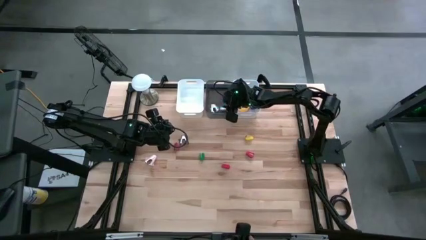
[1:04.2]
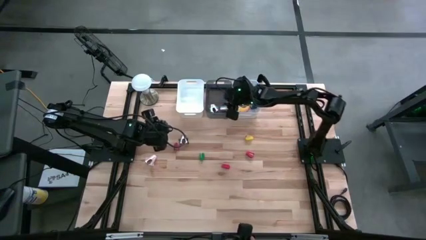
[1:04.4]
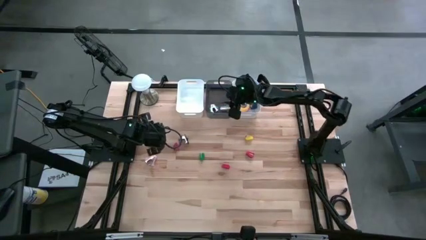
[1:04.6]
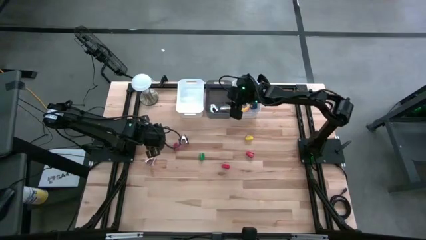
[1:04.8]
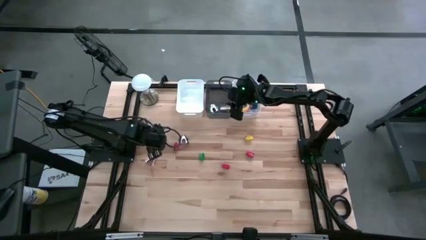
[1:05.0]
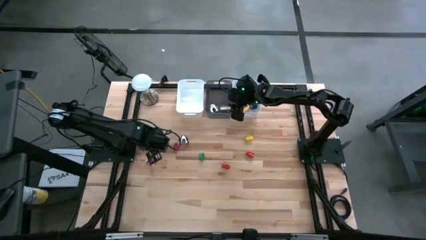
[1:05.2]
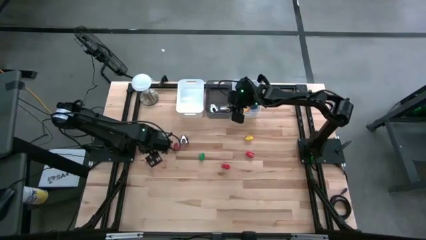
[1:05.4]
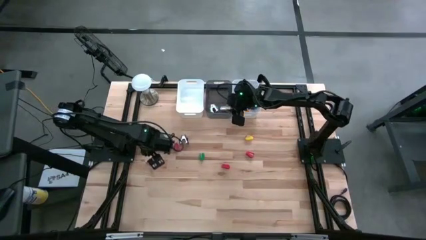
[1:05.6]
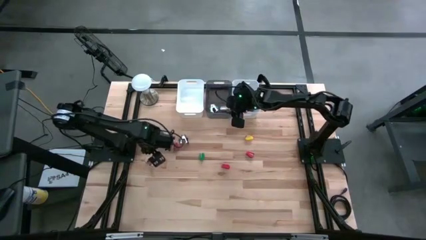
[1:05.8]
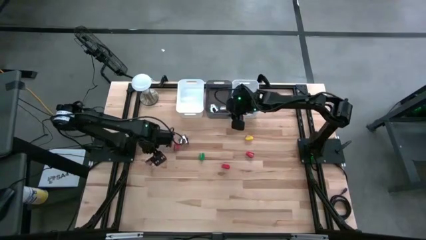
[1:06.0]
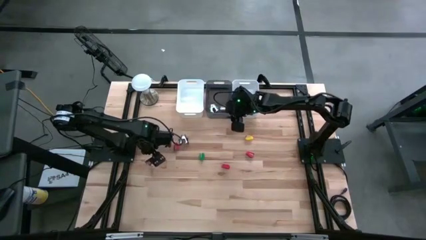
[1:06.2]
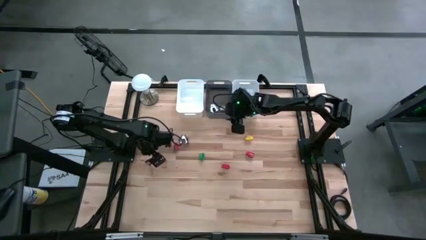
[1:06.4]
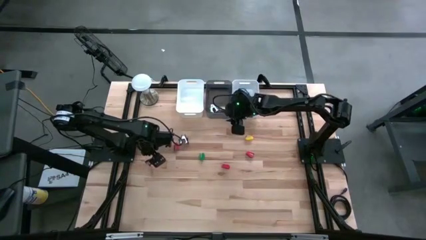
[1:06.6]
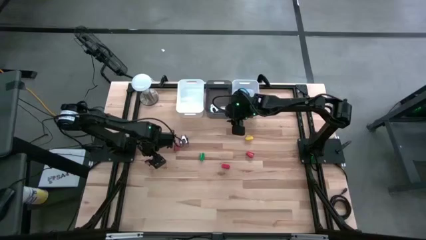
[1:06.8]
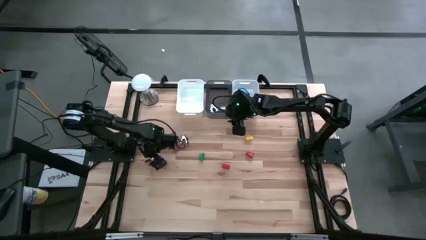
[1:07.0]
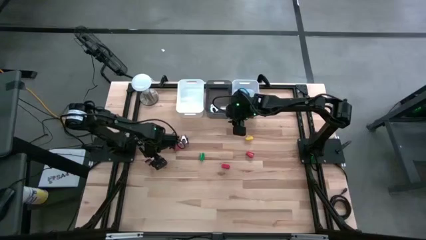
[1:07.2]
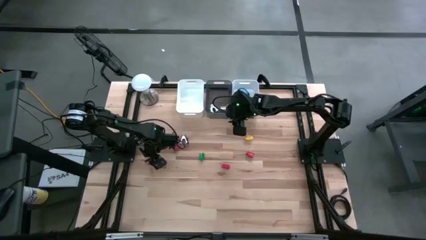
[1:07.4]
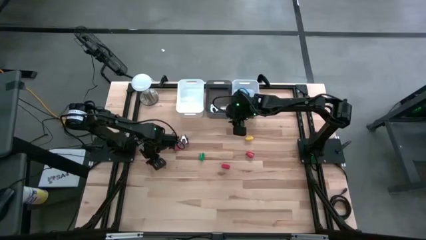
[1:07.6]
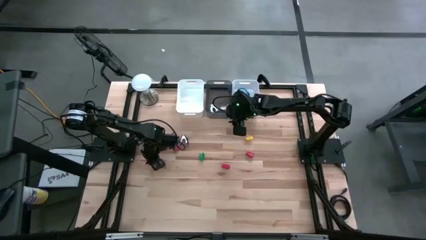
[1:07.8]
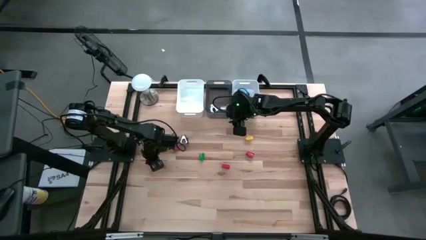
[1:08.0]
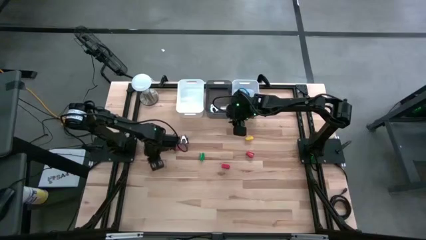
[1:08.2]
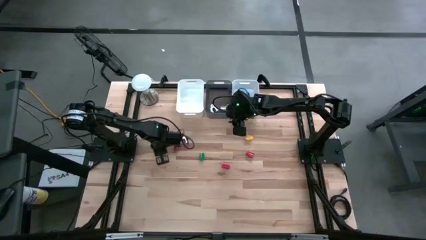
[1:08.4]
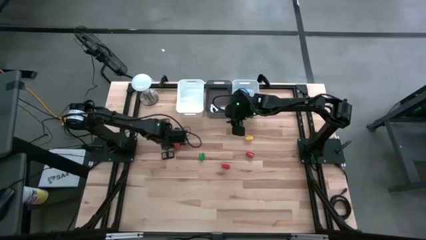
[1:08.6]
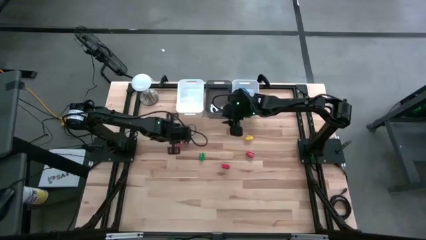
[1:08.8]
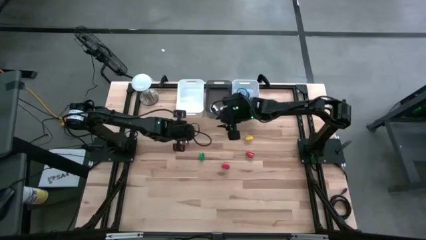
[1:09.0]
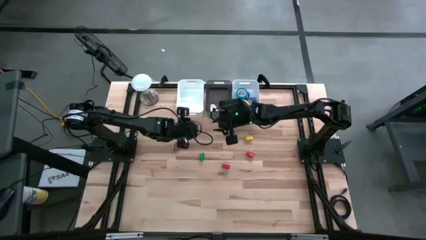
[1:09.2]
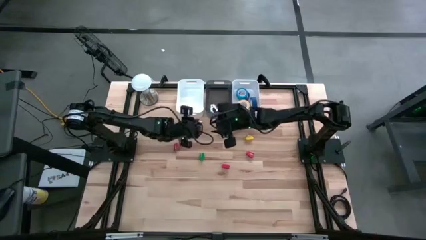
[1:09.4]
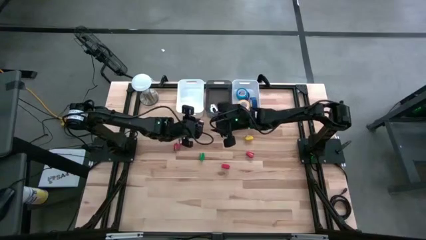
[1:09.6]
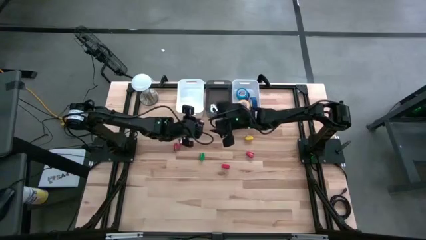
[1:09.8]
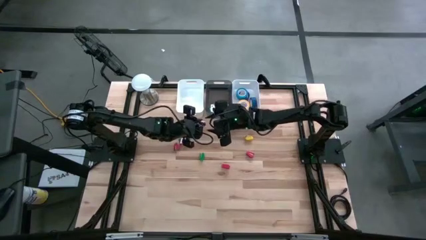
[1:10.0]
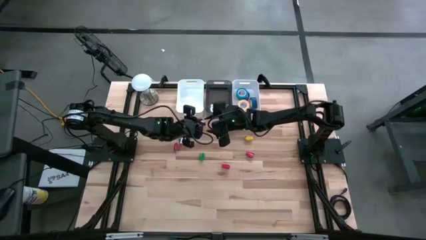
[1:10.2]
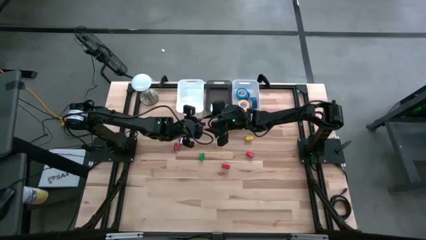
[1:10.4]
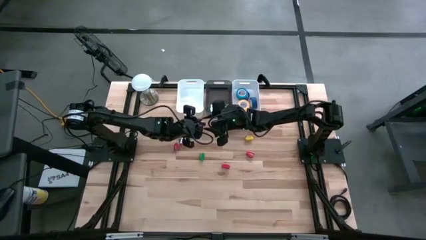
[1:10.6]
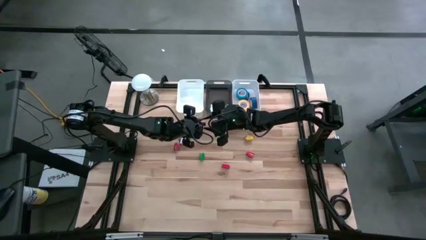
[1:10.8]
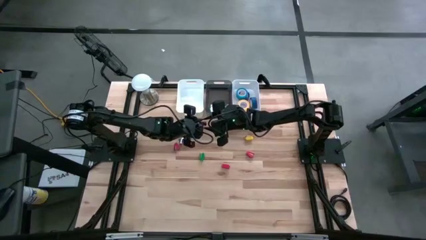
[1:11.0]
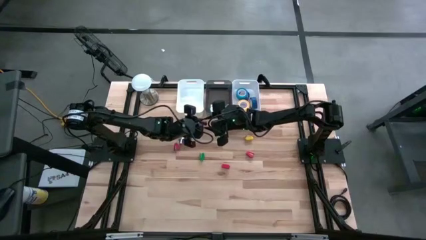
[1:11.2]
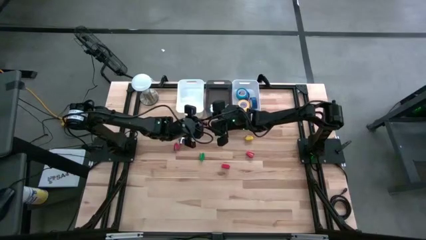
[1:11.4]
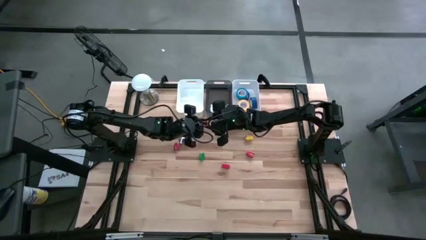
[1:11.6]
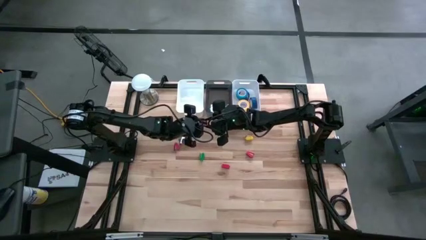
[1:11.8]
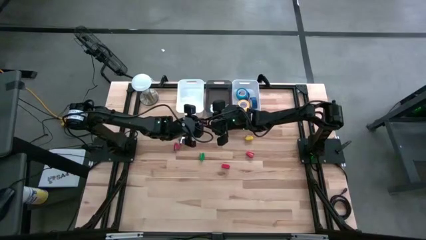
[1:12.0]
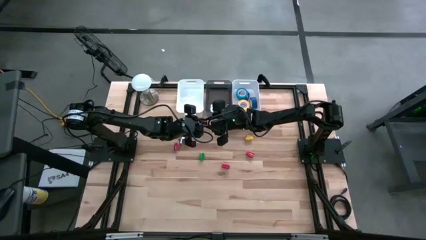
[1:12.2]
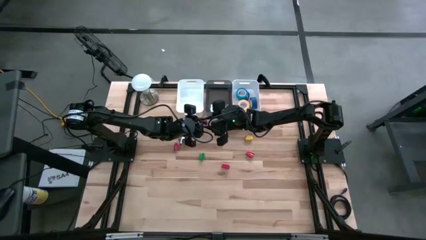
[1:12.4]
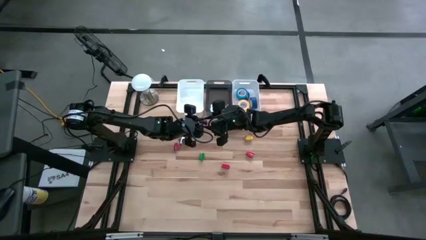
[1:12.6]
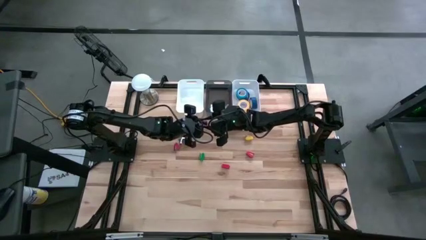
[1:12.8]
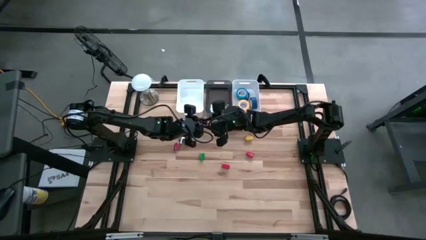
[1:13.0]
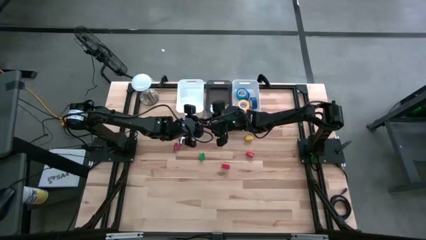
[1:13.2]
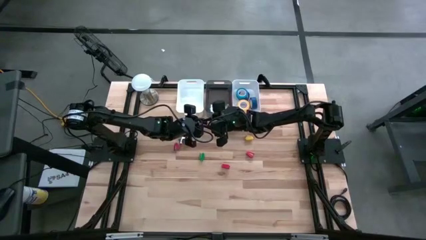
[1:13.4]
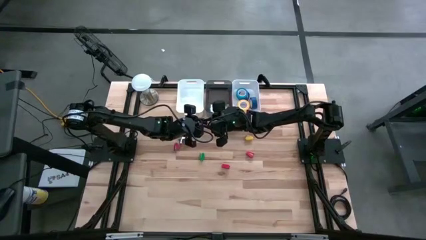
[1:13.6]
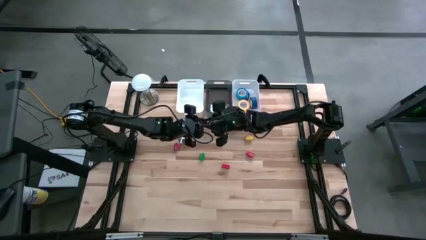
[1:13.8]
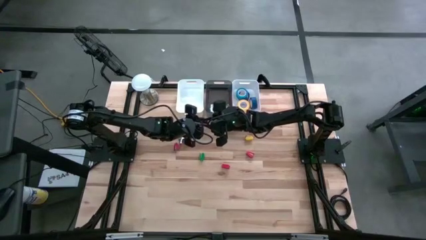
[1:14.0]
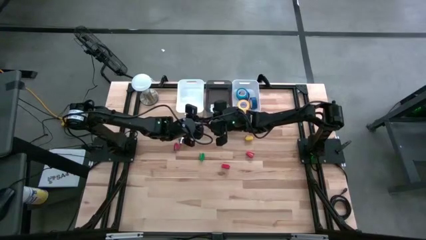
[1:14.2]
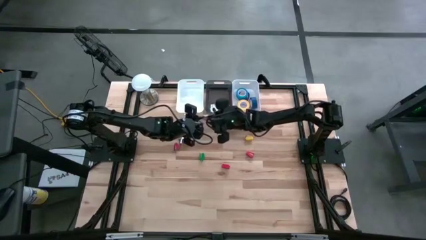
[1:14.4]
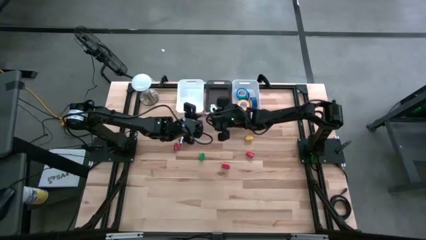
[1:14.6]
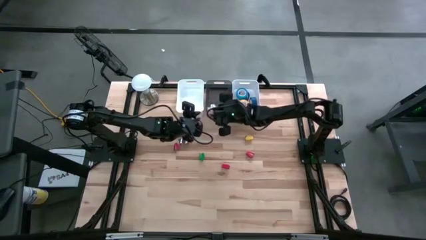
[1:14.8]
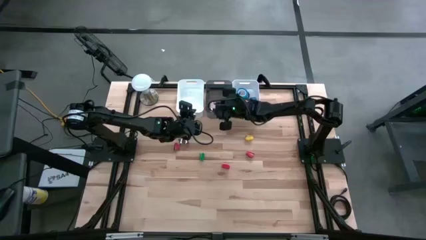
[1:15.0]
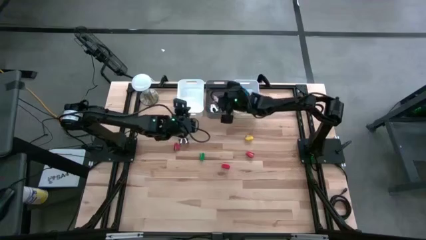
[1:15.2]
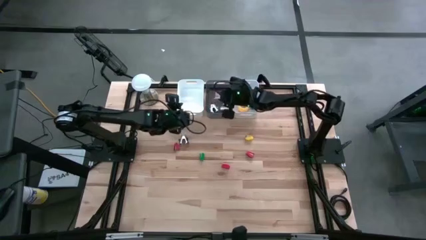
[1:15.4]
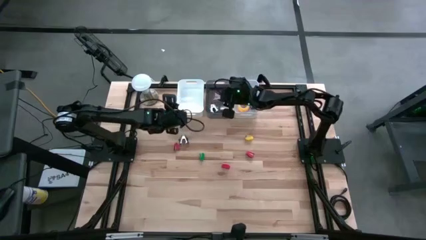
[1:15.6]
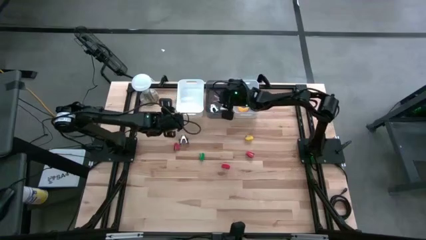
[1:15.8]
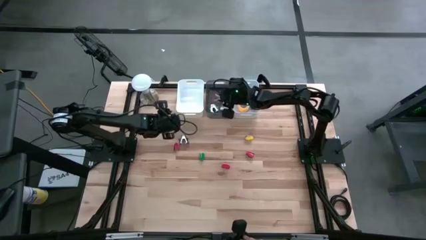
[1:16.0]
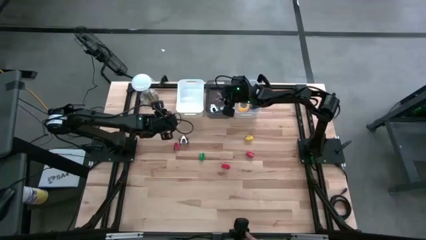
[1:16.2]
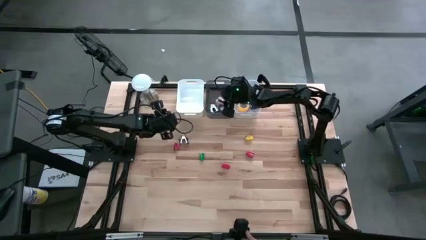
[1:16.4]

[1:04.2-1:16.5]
Task: Pick and place Stapler, Stapler remover, tape
Put the light pink staple remover into the black bin

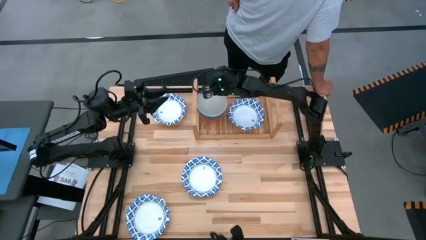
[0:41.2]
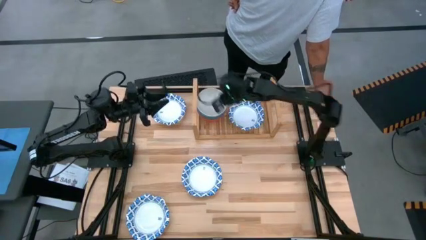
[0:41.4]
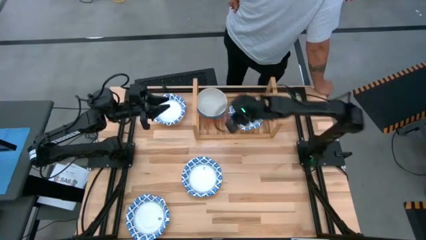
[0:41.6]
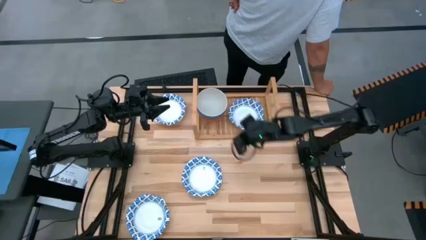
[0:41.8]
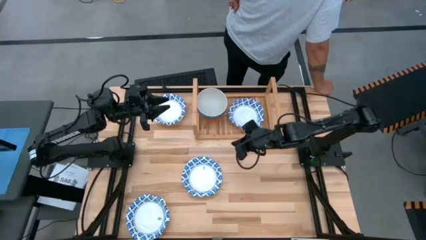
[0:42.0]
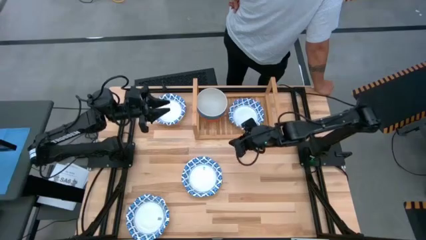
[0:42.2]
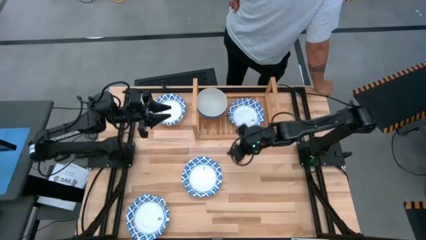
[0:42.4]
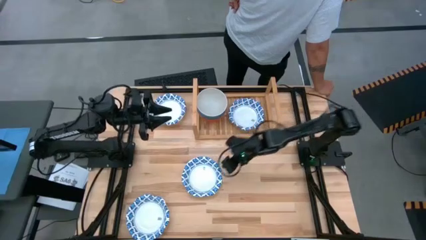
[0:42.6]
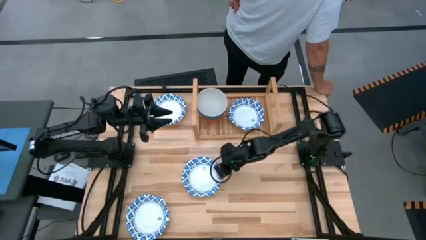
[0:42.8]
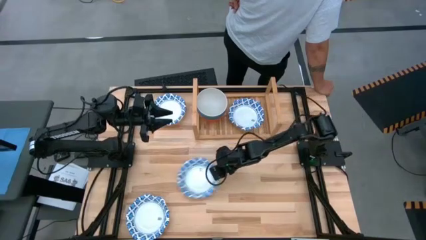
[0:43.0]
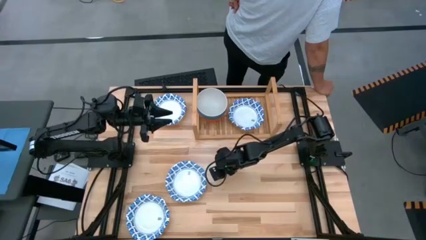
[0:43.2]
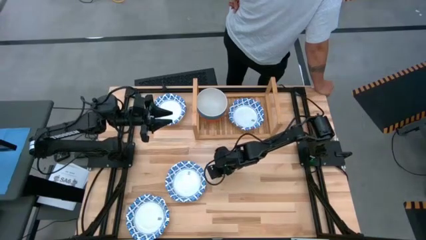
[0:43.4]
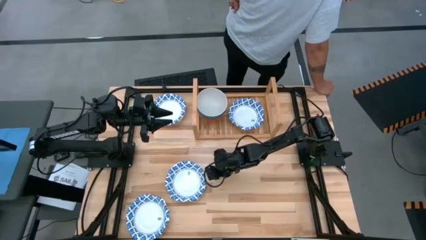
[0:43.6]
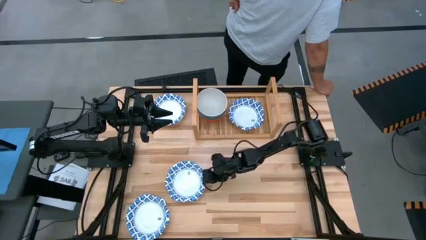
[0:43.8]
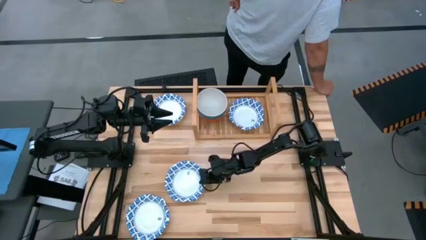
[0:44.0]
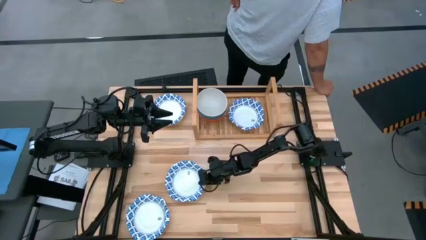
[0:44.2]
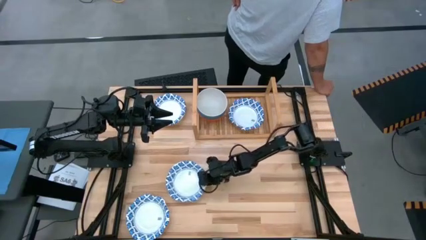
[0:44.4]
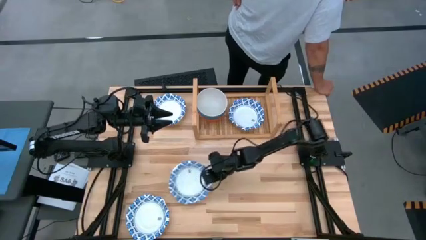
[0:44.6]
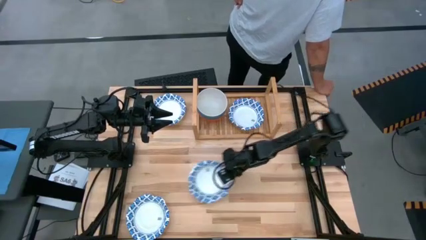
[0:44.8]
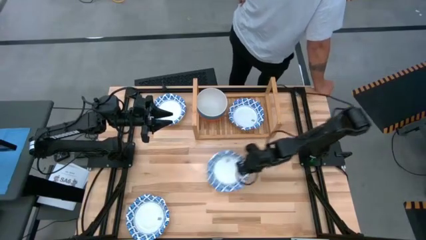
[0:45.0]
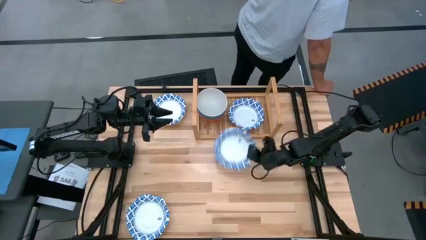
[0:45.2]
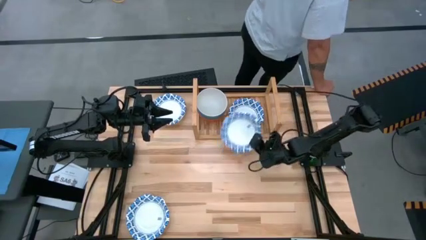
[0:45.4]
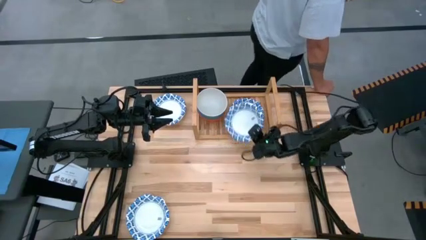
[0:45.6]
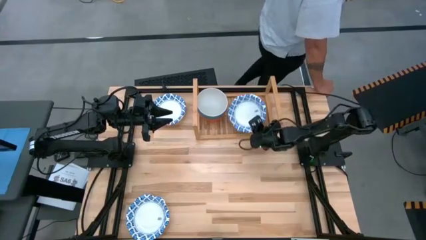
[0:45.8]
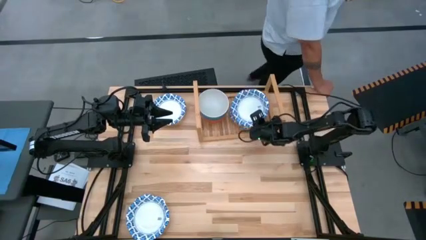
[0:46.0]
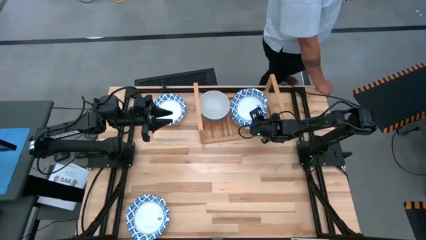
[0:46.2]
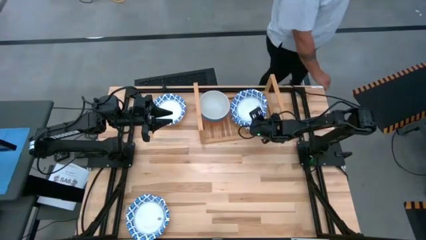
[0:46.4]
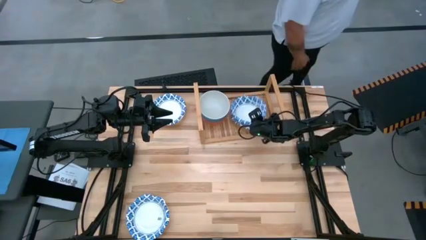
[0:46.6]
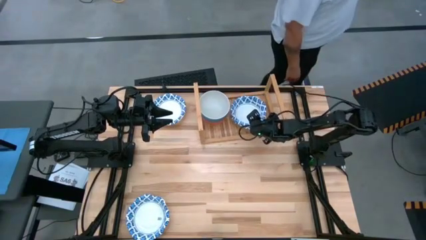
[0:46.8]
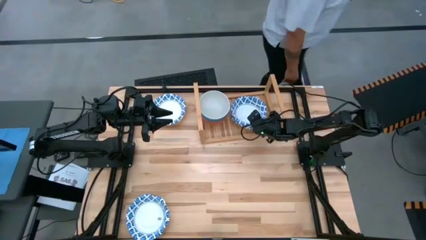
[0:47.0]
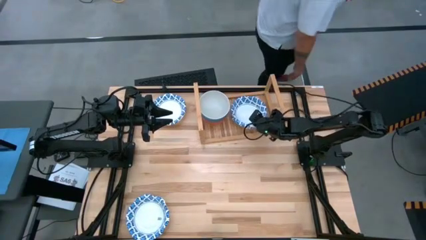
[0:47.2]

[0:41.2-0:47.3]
Task: Place and stack bowls onto a shelf
Stack the blue patterned bowl on top of the blue patterned bowl on the shelf
